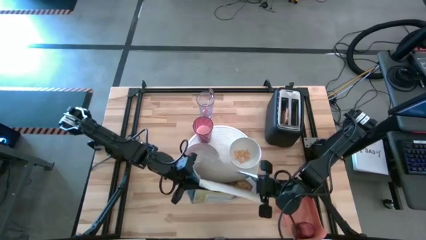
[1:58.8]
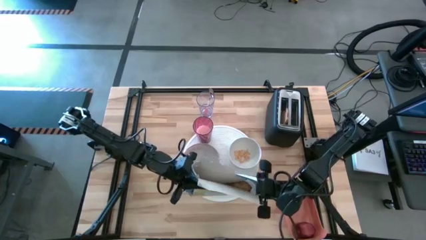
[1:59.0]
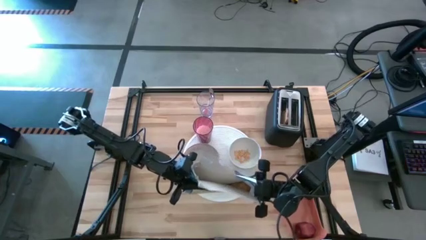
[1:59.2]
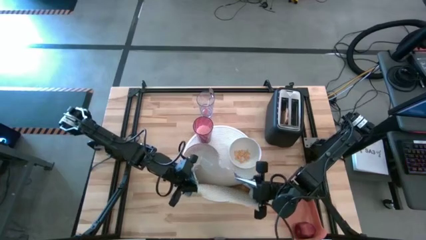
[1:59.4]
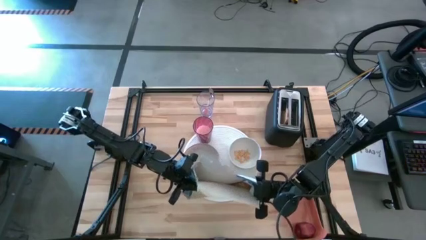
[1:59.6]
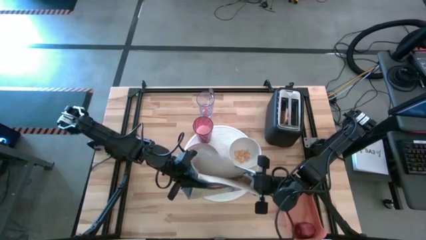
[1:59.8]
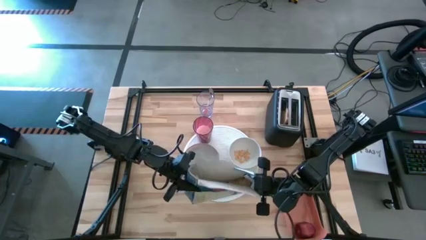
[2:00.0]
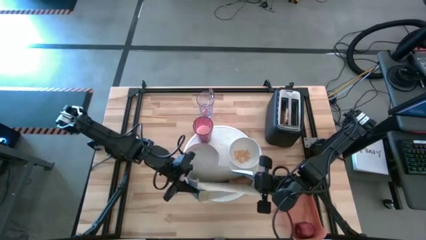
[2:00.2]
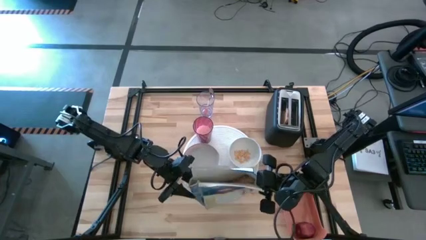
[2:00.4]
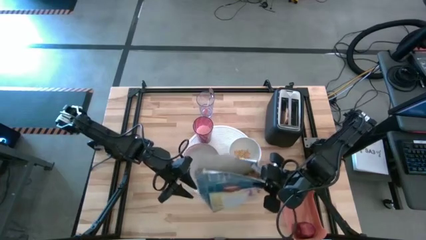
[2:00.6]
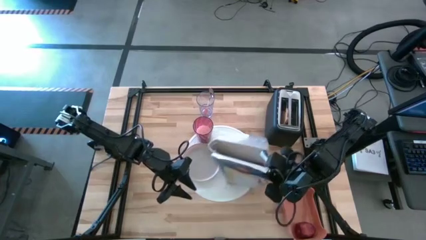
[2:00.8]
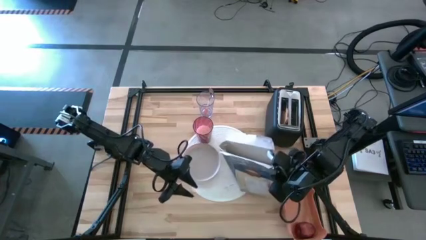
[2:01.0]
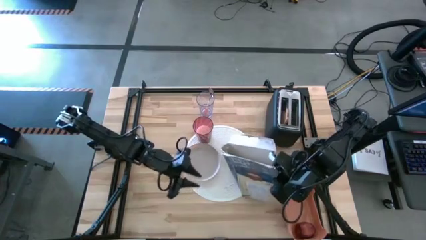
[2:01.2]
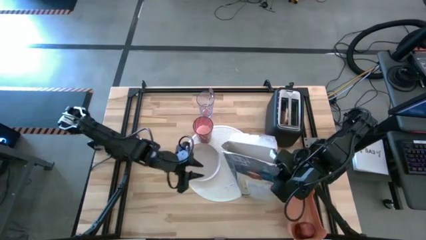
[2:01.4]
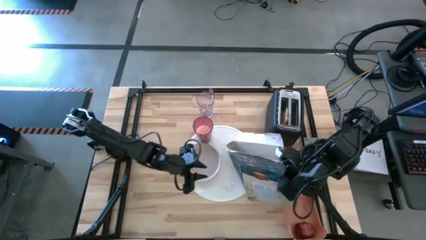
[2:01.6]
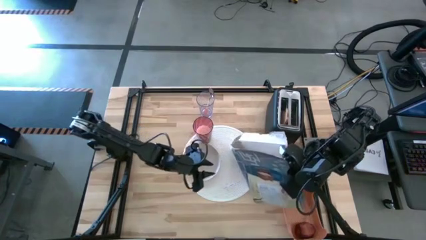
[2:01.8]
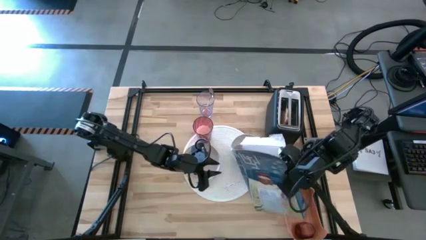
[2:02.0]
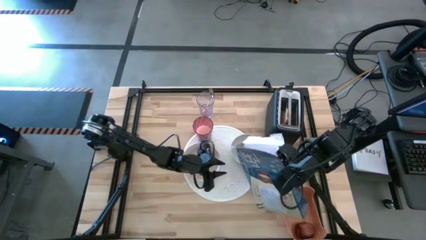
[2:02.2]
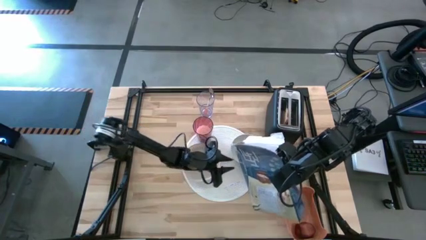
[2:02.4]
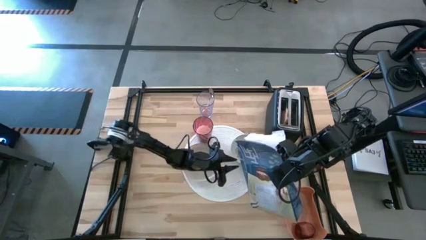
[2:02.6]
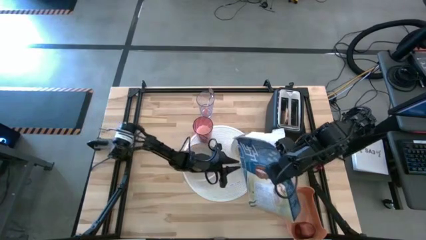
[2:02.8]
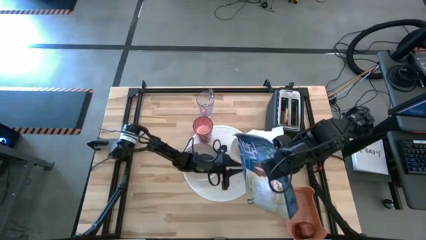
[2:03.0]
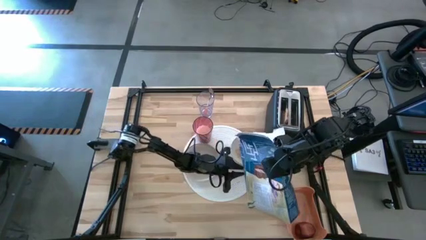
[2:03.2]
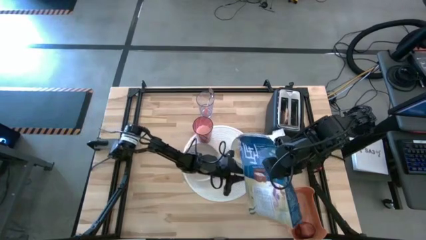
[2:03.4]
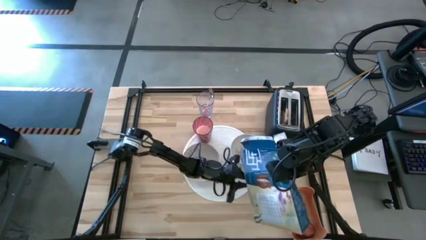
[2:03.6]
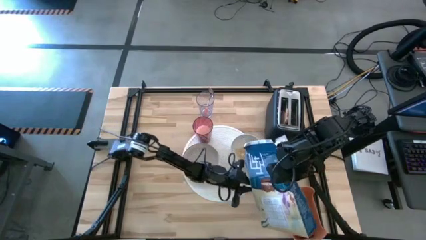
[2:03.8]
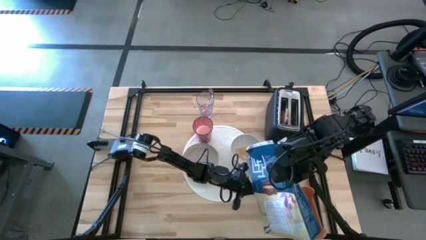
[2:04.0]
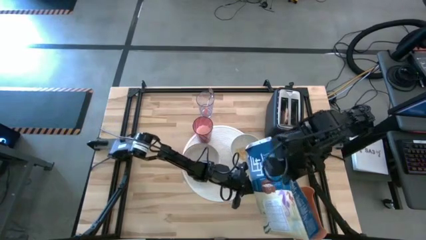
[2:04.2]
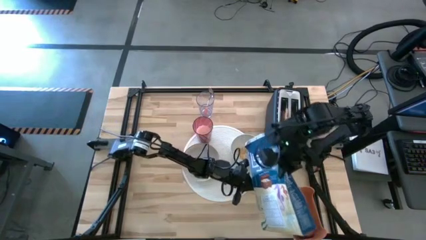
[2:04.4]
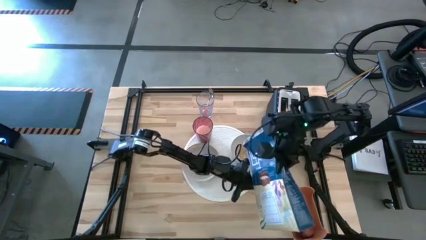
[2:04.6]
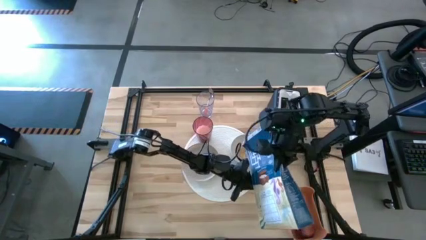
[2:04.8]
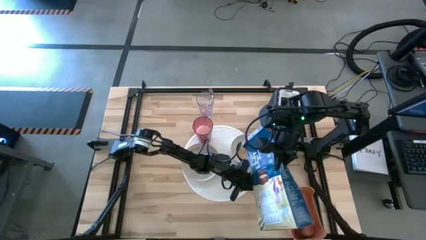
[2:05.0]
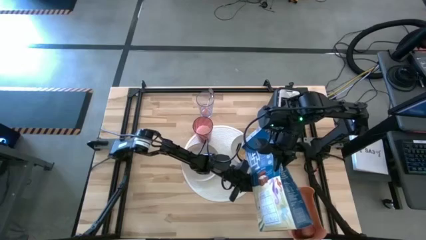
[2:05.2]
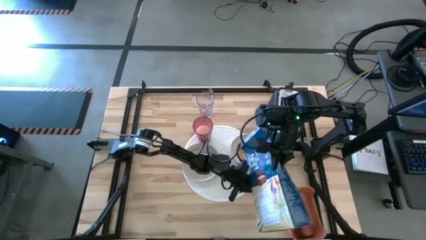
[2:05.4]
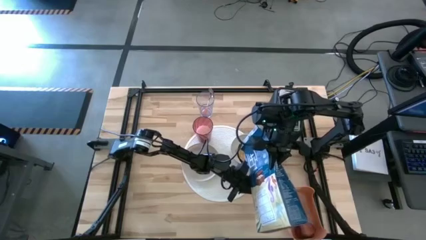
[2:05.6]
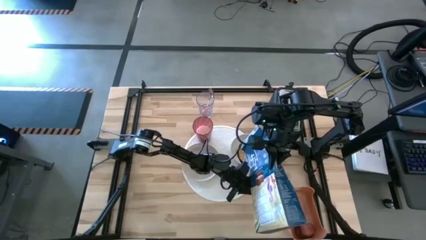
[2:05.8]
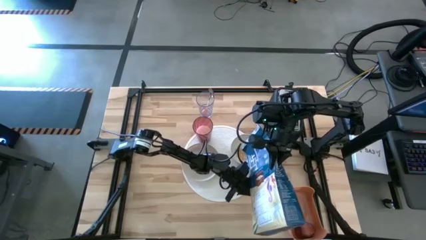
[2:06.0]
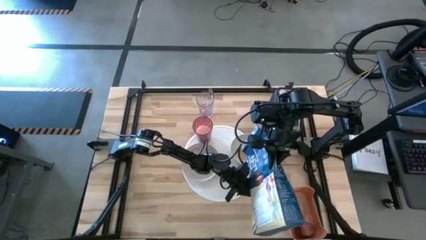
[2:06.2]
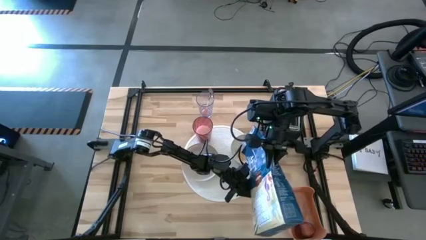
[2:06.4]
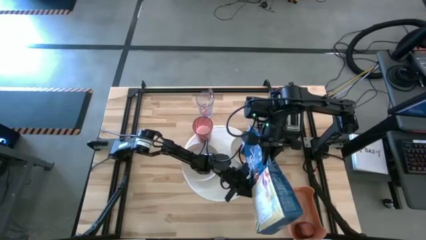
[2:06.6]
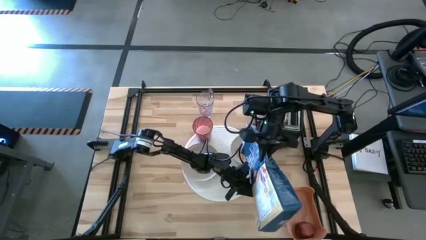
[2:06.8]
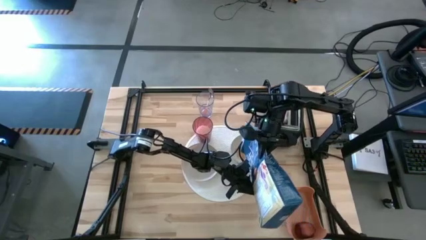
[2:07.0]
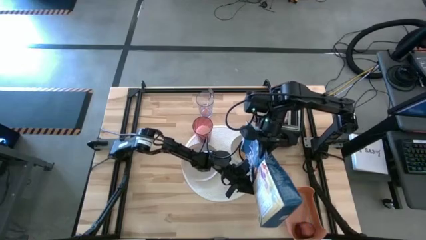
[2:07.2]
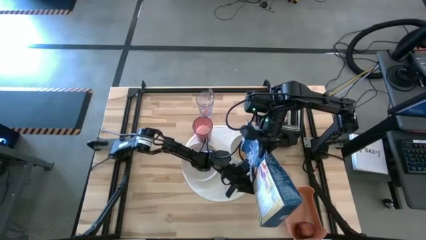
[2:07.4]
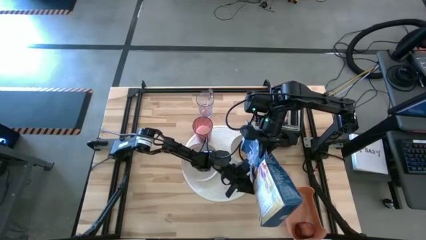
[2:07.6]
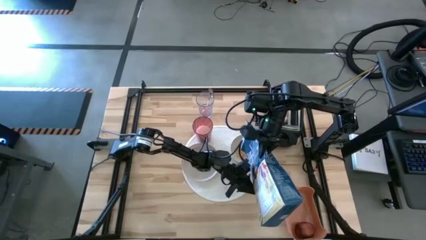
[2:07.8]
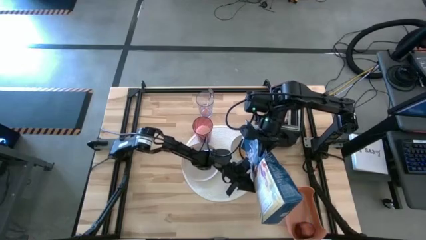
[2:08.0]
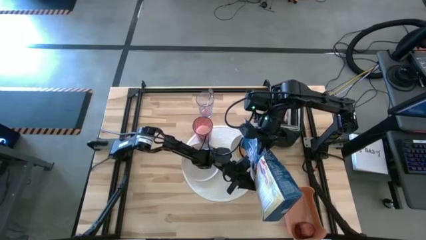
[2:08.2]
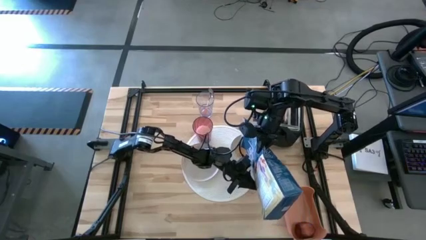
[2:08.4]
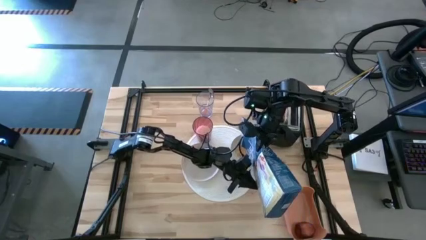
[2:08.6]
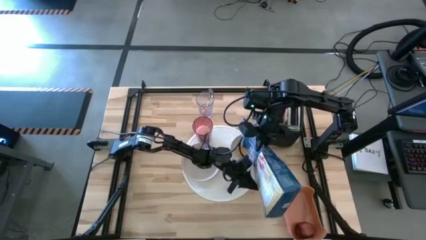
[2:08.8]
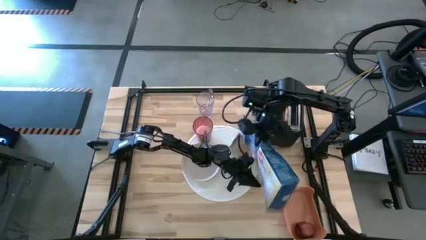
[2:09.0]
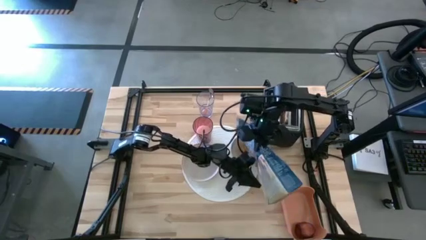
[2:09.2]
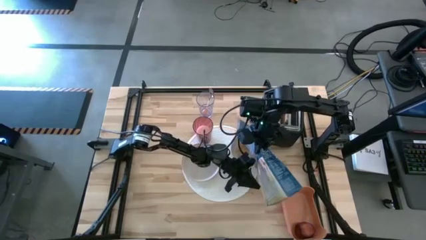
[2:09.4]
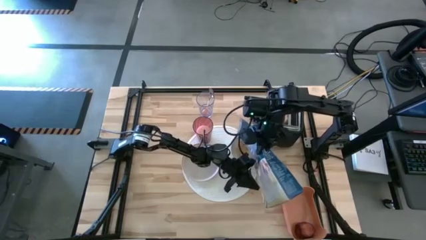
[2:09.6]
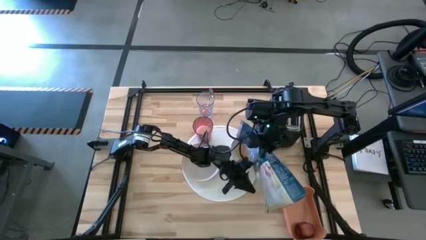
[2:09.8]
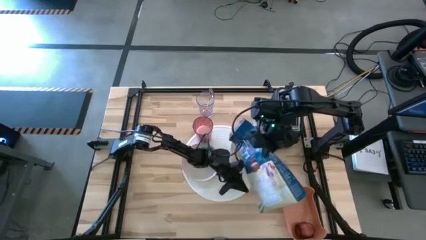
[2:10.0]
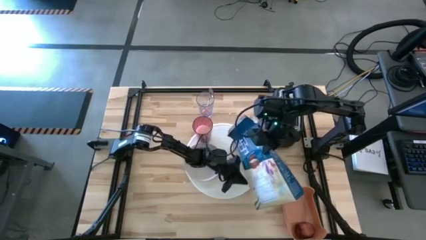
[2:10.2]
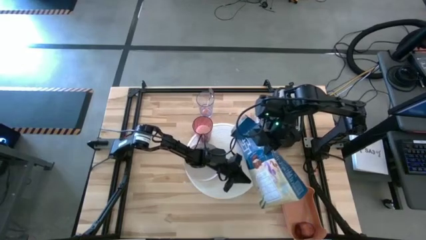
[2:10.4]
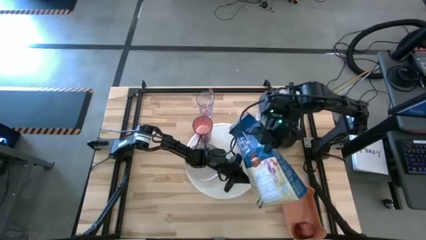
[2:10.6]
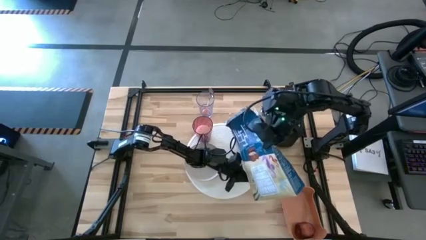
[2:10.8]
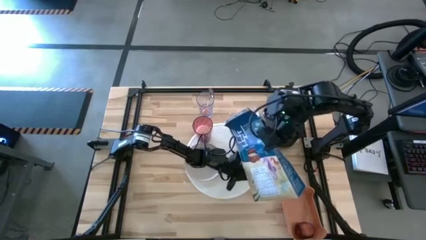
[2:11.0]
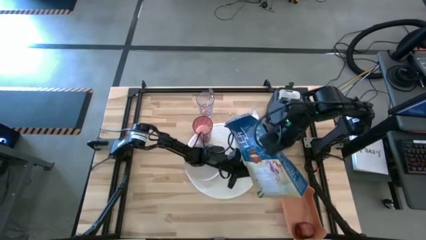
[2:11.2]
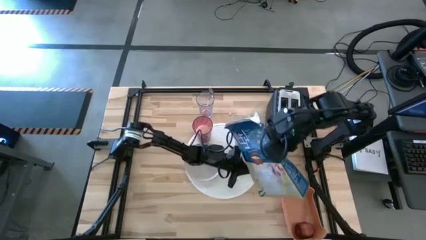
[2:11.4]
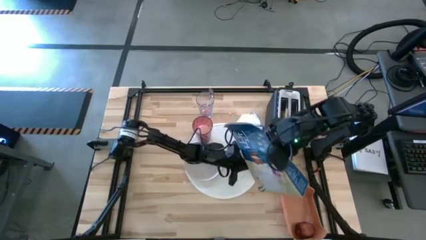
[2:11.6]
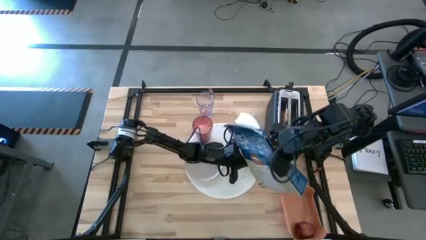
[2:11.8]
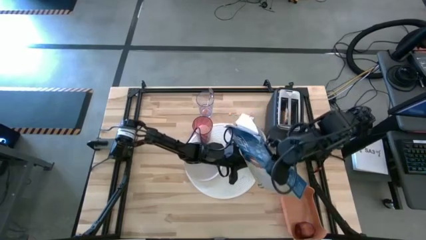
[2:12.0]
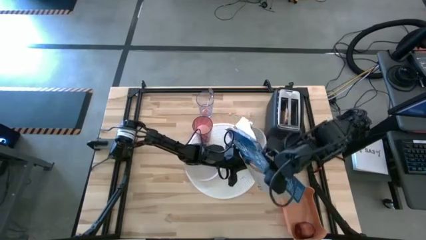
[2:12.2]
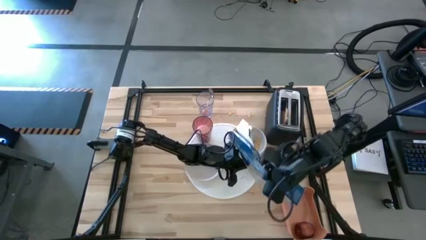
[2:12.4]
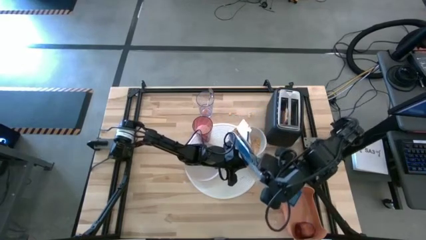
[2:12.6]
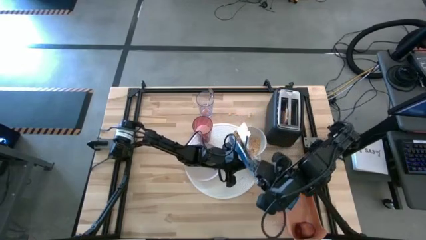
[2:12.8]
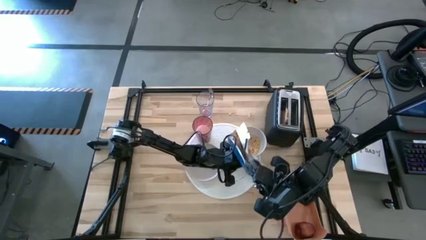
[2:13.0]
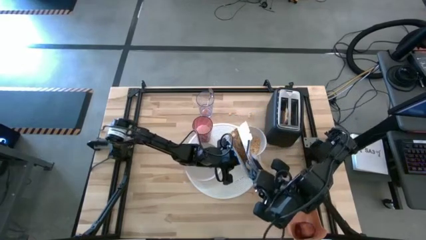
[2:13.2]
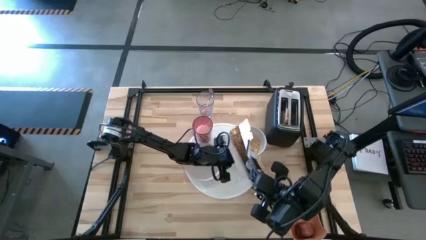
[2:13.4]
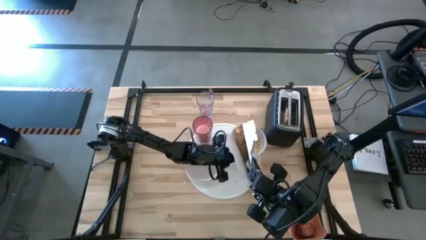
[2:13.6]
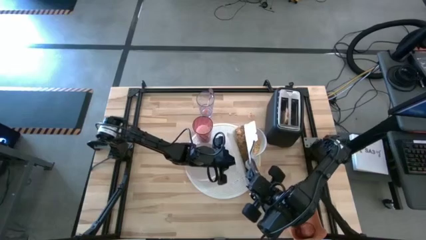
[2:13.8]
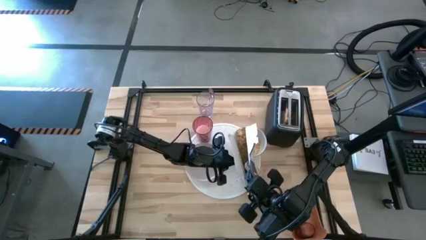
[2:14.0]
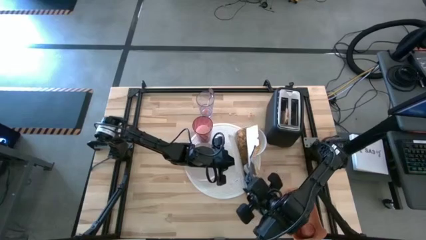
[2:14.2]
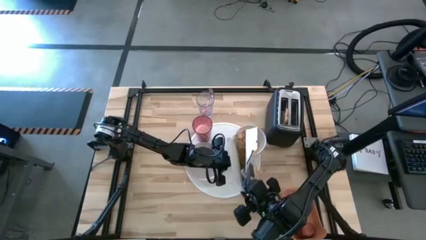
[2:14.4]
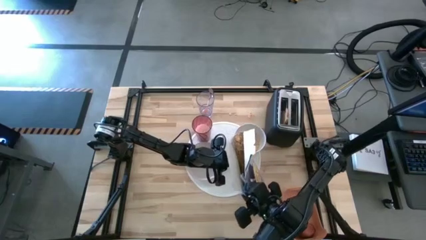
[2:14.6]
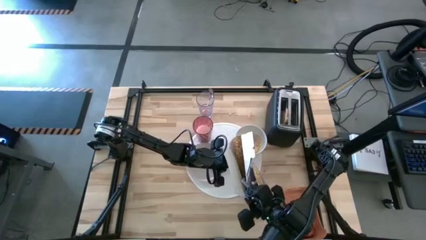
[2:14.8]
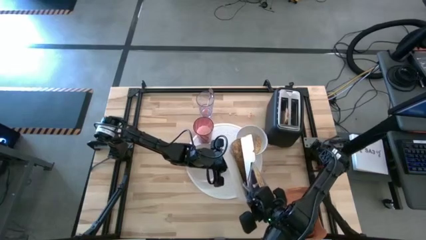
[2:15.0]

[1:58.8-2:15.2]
Task: Arrange a breakfast setting
Pour the cereal from the cereal box into the white bowl
